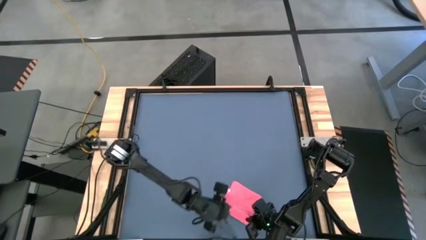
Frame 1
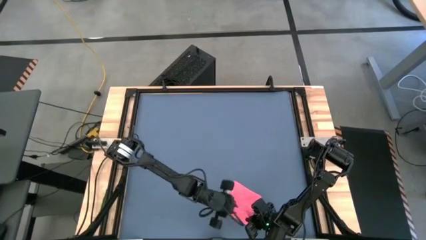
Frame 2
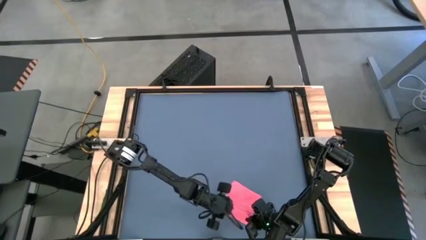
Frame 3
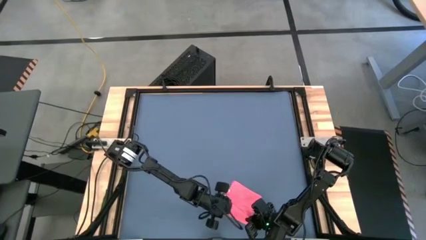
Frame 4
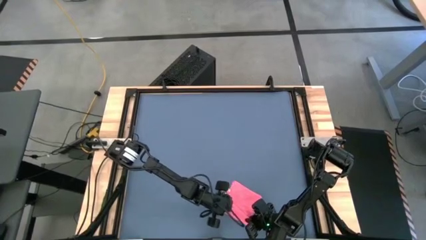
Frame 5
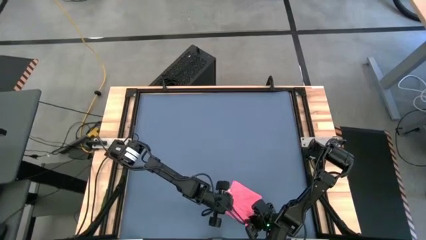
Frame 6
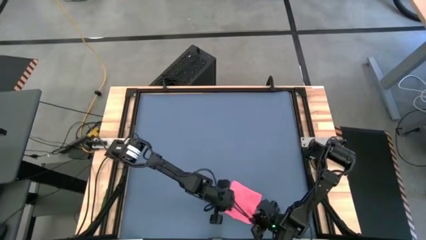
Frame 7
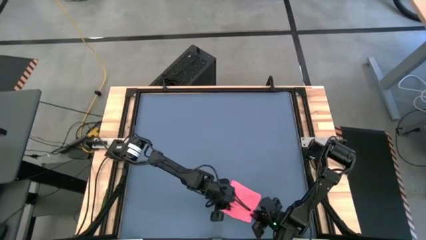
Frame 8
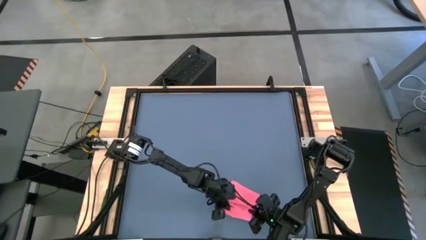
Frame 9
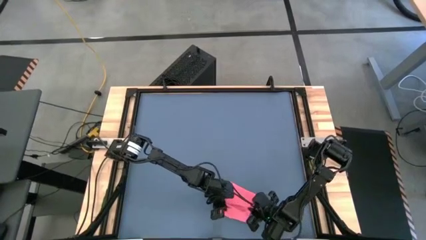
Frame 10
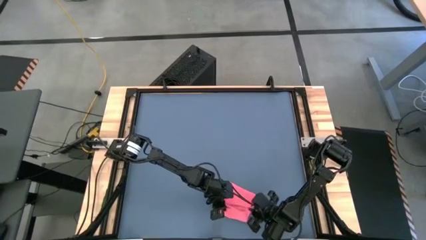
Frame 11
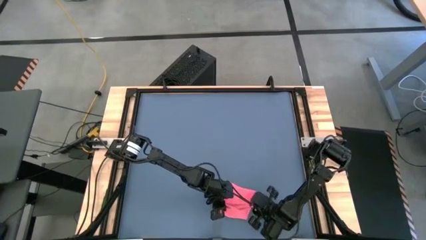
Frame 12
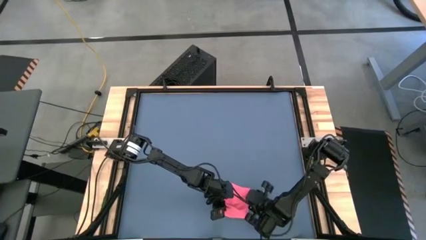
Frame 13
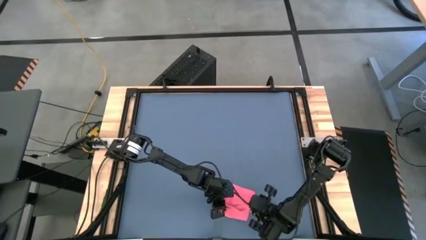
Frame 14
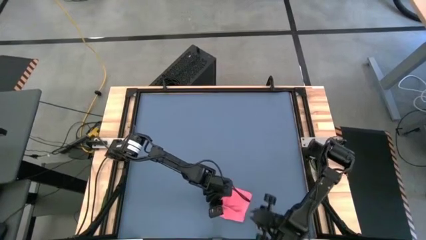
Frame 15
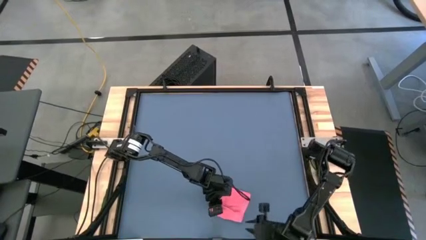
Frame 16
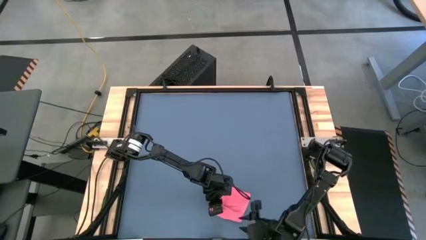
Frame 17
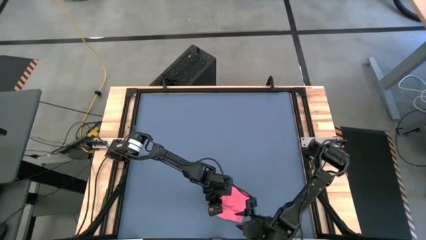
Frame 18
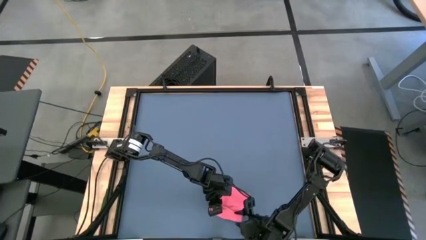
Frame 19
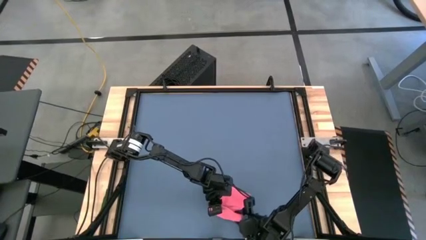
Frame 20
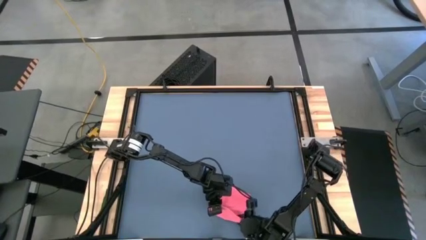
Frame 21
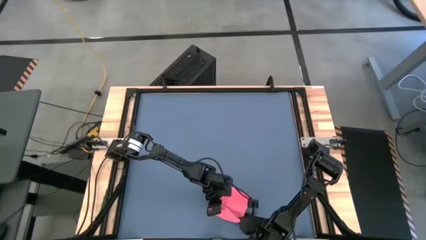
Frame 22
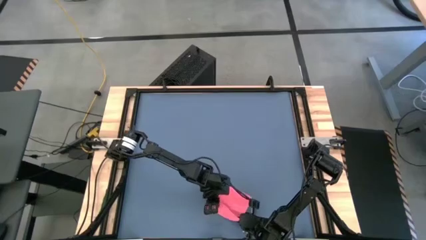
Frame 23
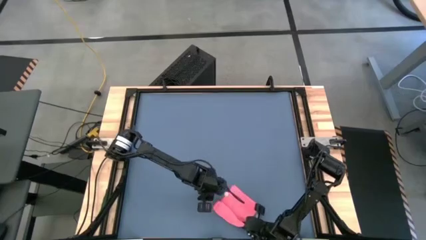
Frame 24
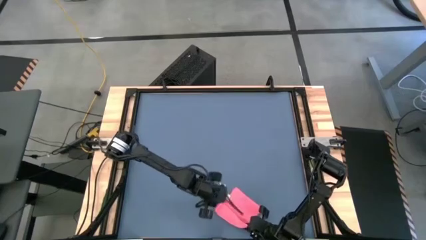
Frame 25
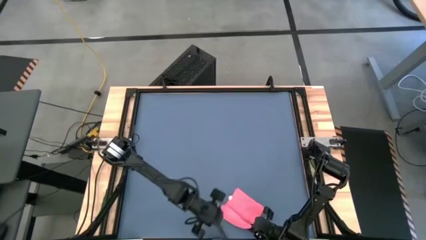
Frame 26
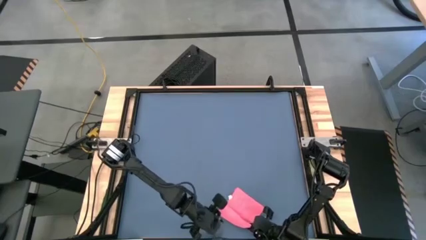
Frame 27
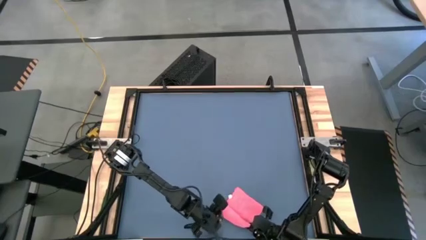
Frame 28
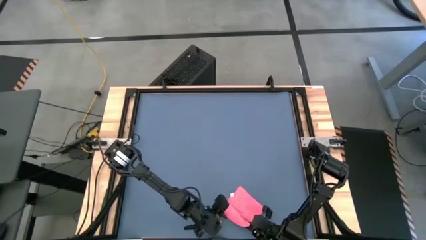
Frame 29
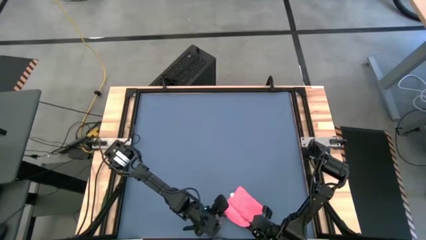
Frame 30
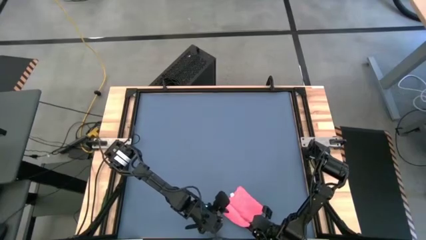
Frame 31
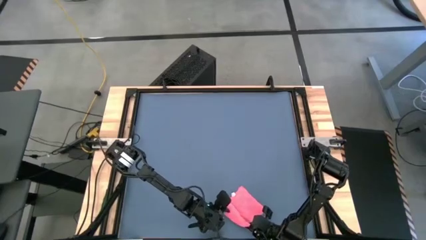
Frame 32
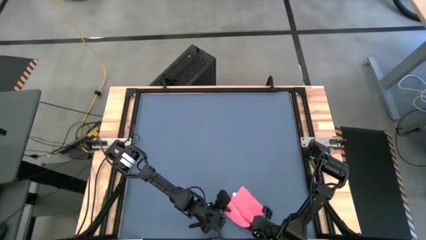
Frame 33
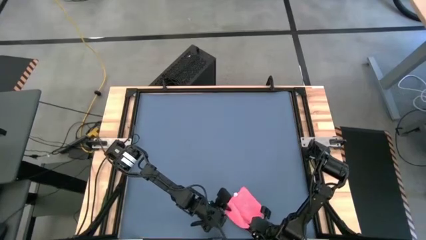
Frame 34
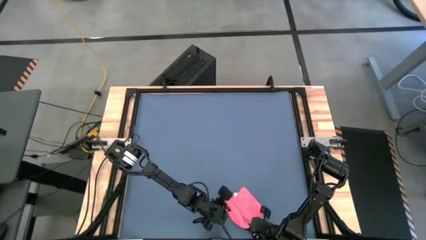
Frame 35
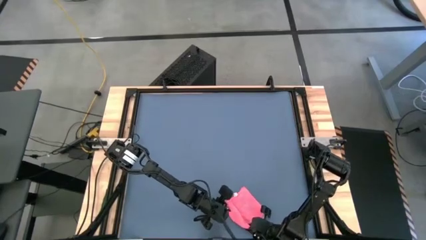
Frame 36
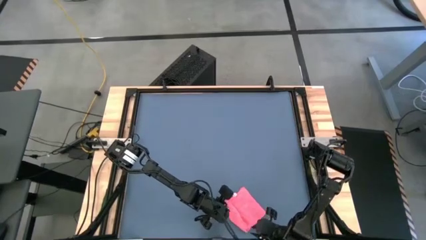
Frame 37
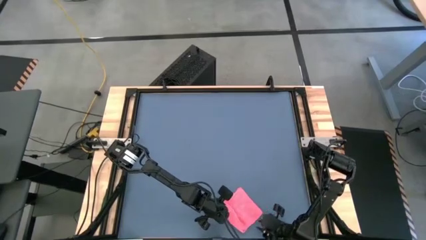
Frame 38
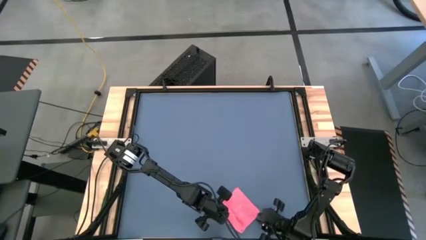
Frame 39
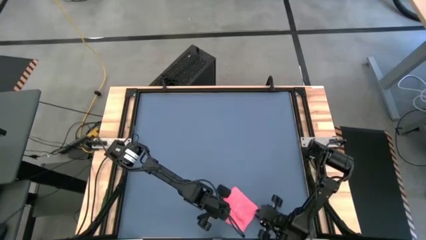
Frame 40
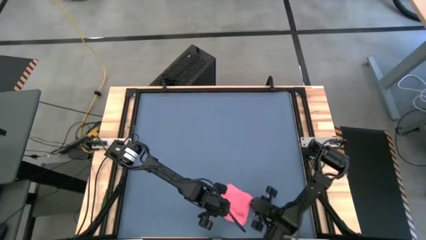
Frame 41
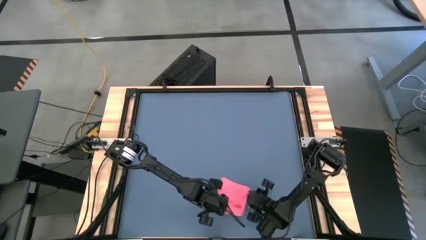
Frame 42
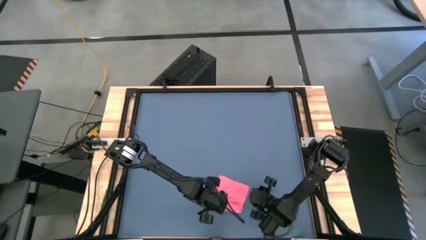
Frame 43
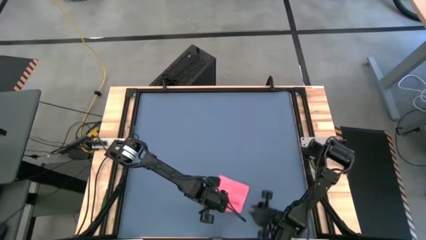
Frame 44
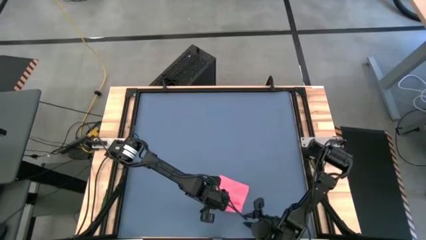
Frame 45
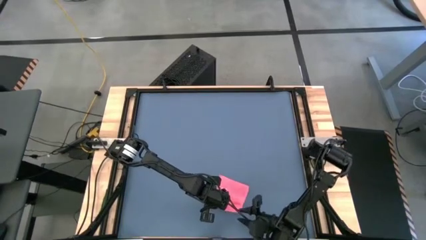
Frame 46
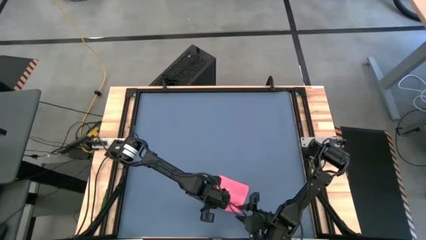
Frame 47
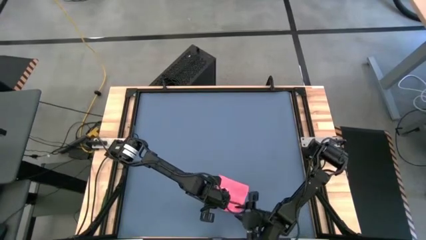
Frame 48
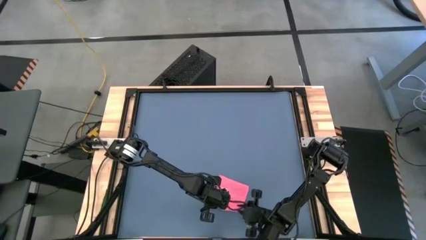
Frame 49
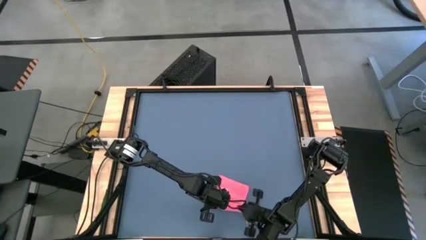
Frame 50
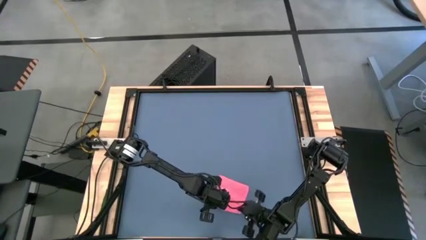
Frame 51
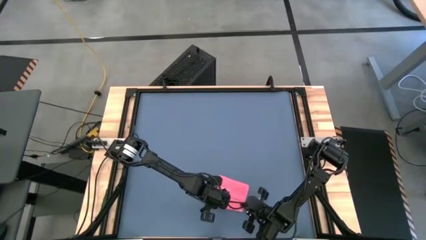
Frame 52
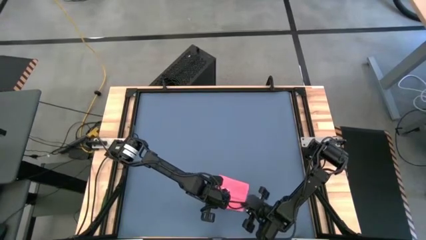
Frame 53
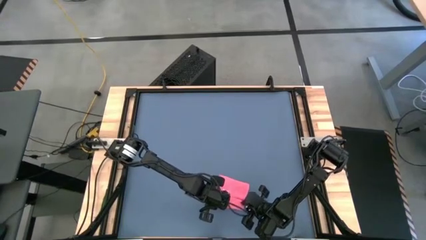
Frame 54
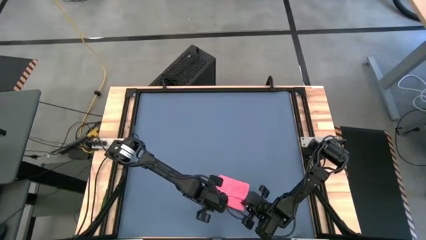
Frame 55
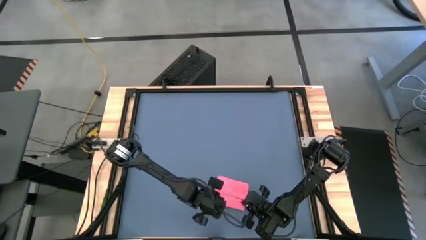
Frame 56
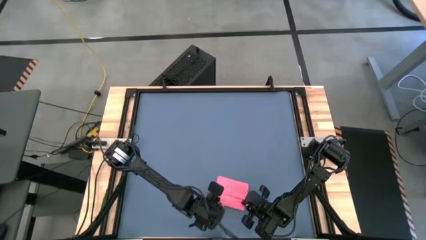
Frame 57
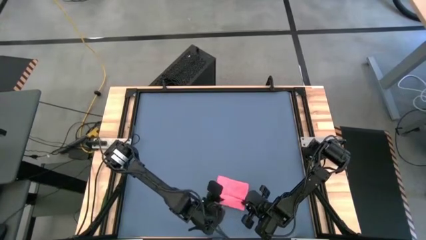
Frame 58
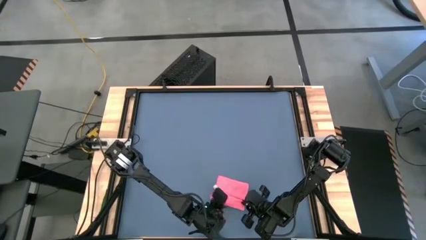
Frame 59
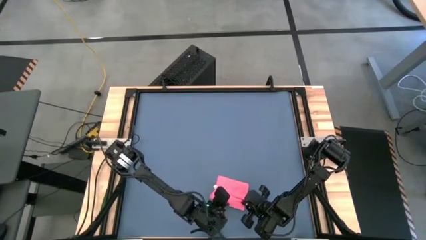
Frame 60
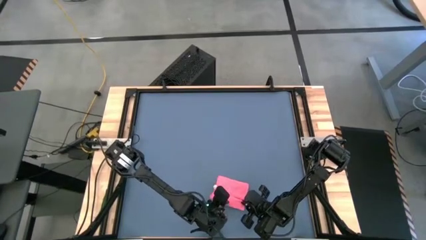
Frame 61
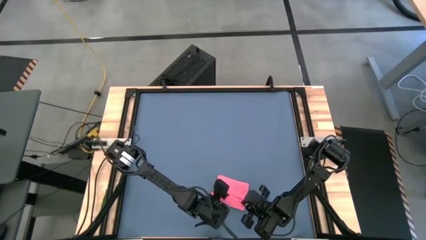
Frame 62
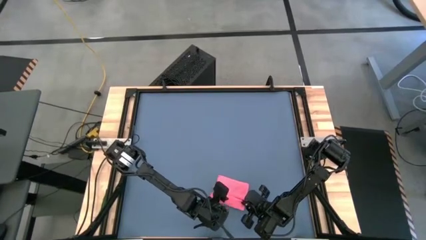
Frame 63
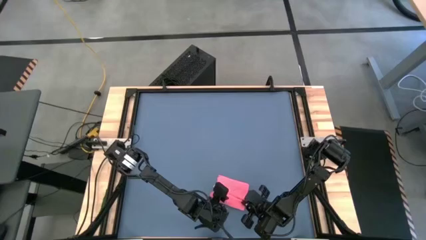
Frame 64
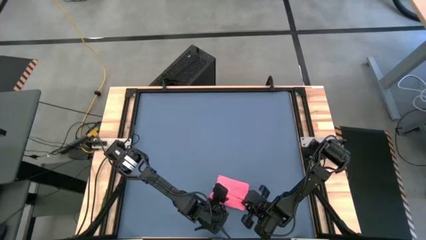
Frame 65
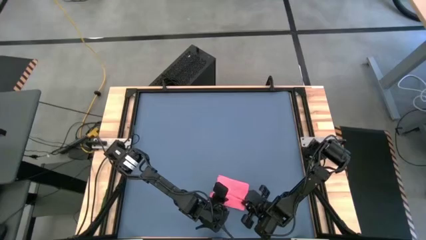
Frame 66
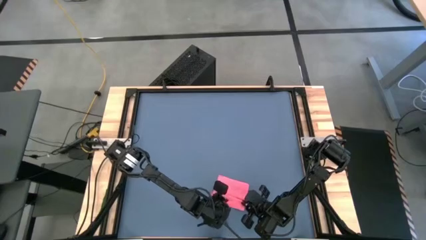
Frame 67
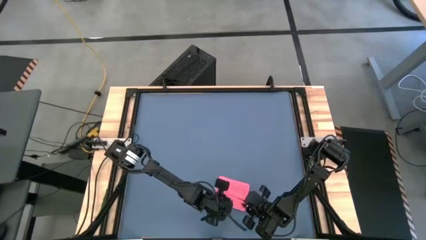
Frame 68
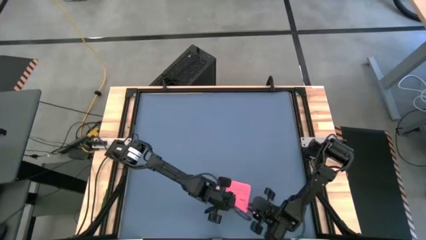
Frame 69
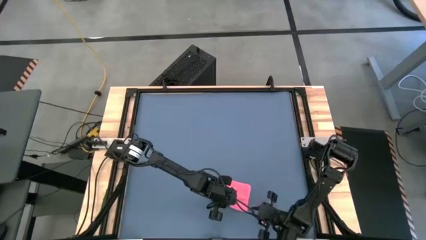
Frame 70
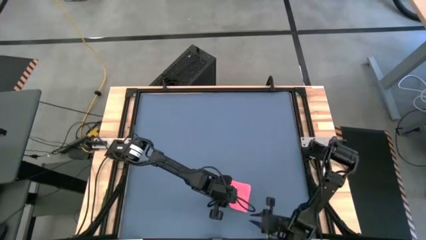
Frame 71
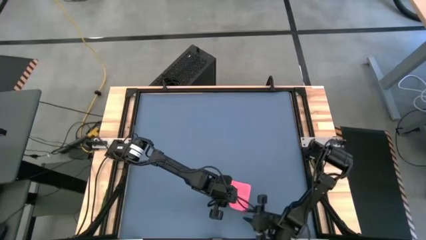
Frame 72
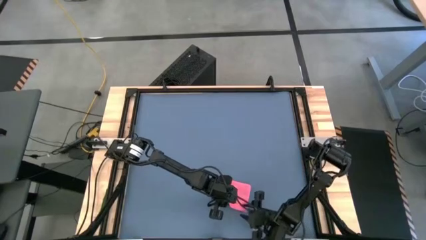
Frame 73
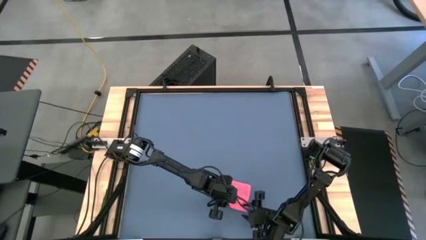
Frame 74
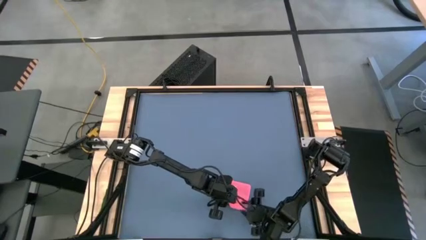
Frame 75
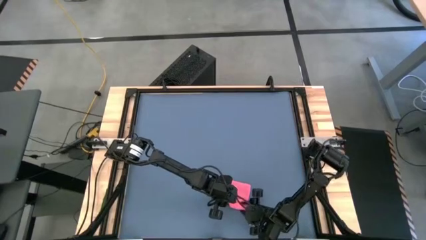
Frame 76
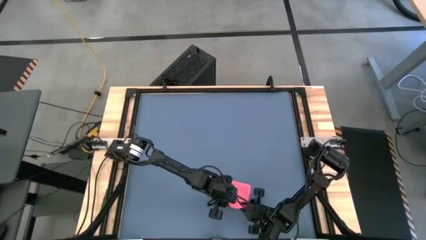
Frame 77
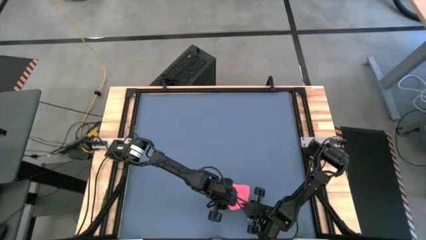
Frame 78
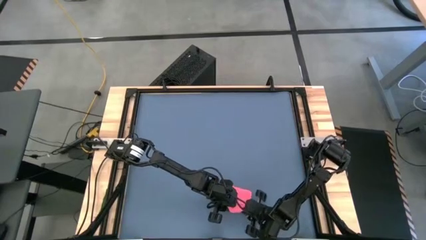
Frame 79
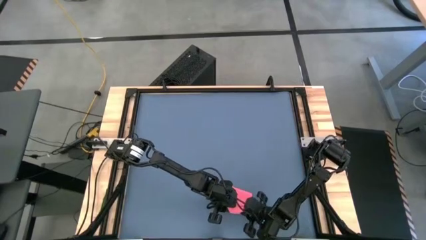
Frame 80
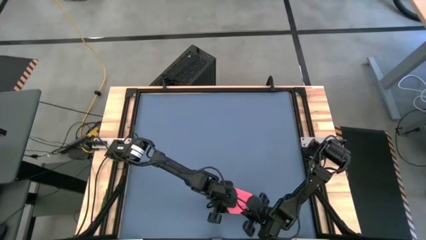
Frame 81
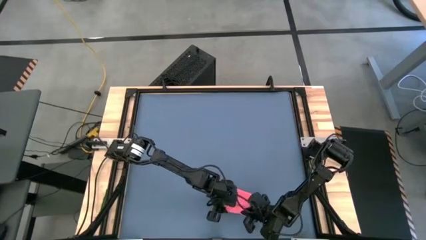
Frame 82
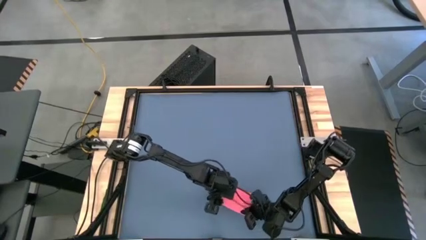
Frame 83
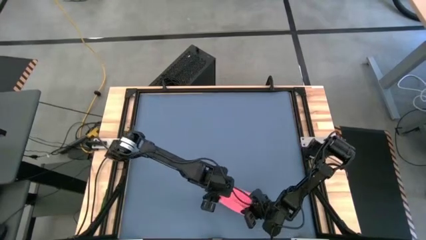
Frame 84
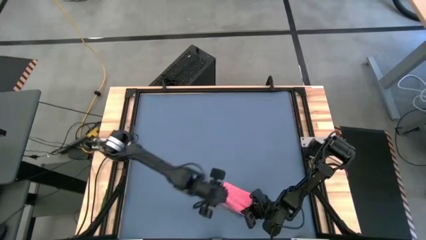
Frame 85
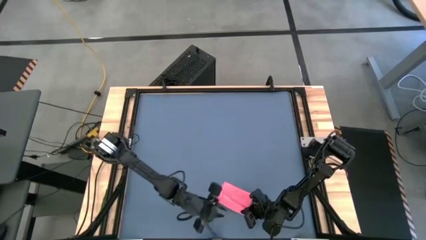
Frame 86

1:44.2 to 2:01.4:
Task: Roll towel
Roll the microfiber towel
